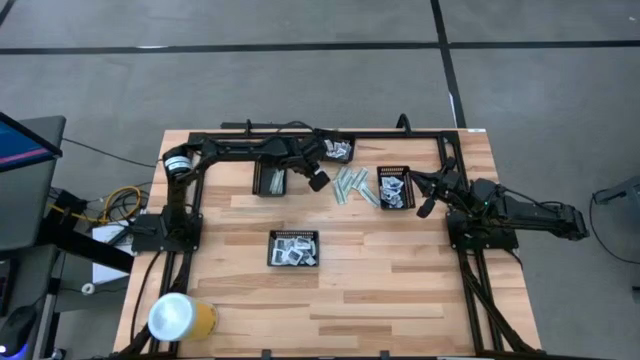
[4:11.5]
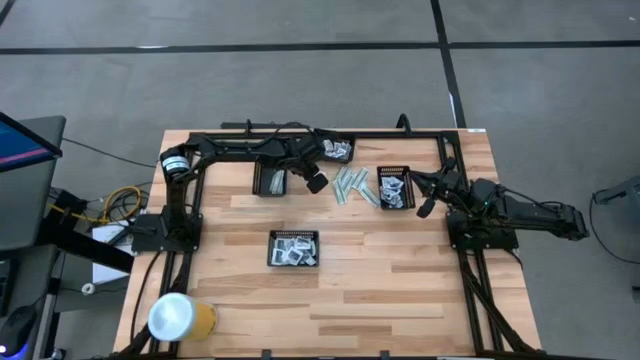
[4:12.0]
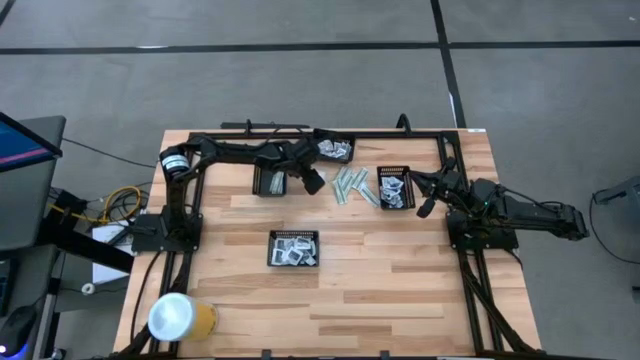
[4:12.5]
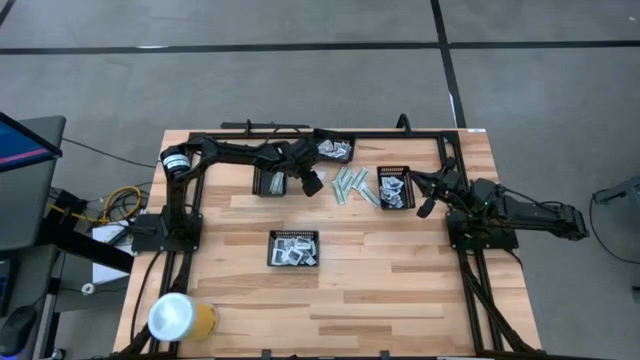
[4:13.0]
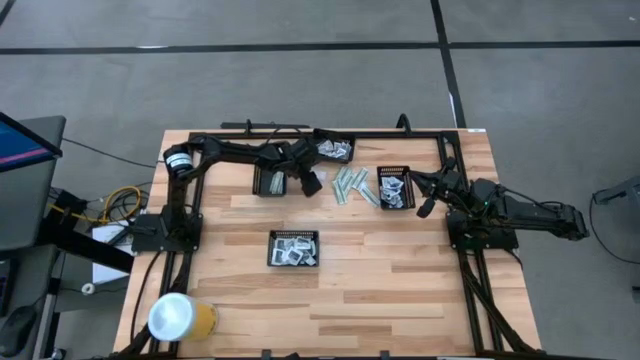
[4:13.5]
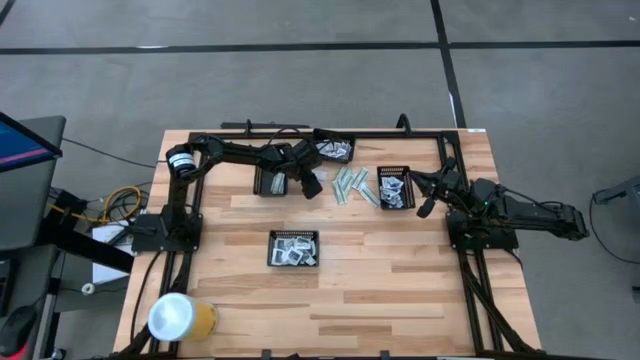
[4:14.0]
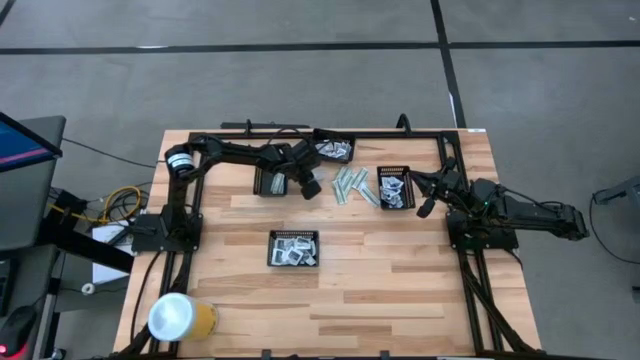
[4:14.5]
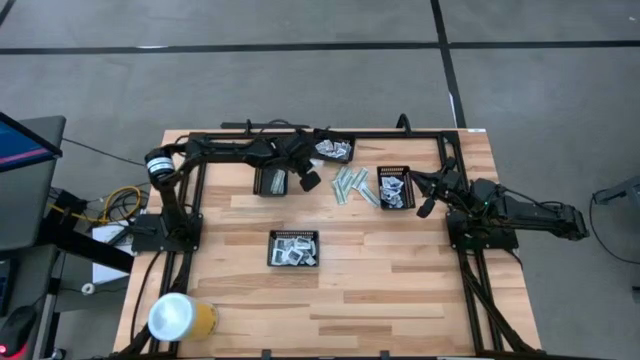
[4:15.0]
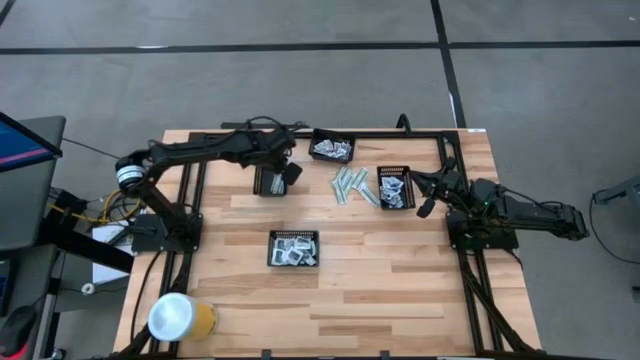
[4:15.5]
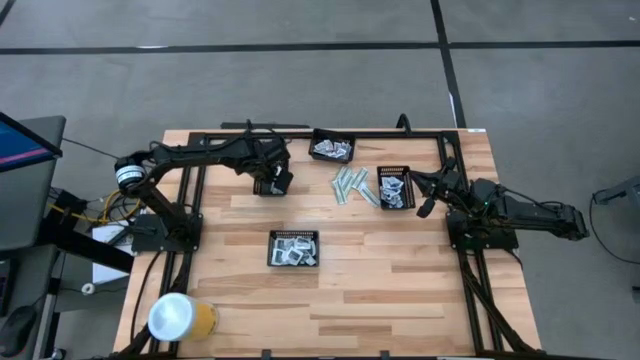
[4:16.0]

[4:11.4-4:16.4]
Task: Pick & Place First Aid Supplies
Put the green bandage into the left black bin

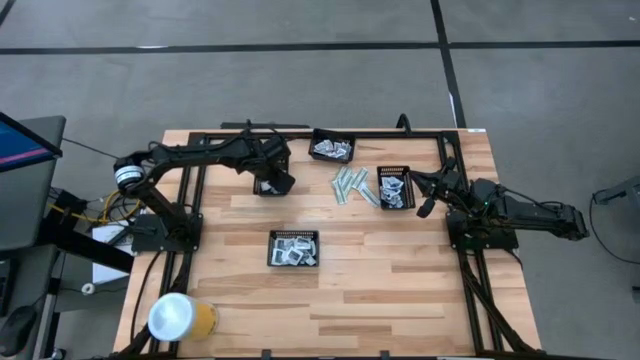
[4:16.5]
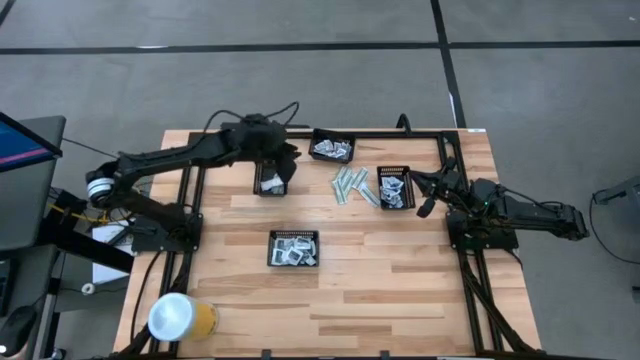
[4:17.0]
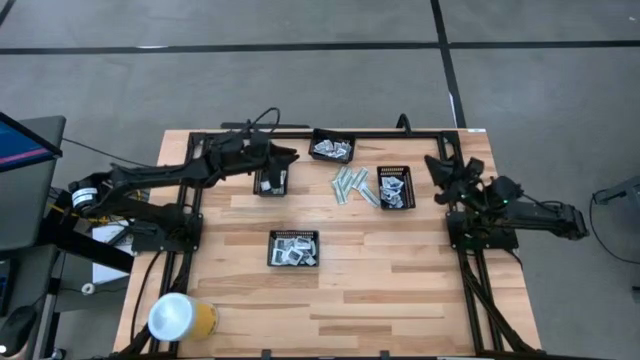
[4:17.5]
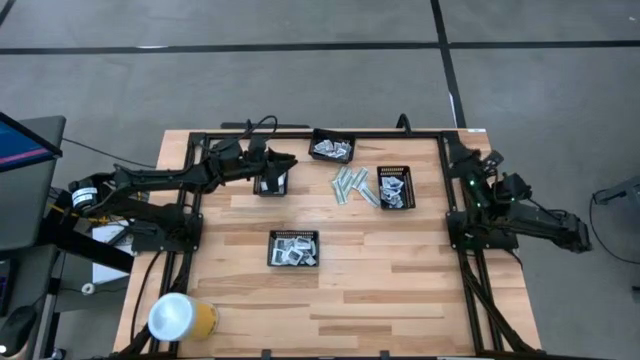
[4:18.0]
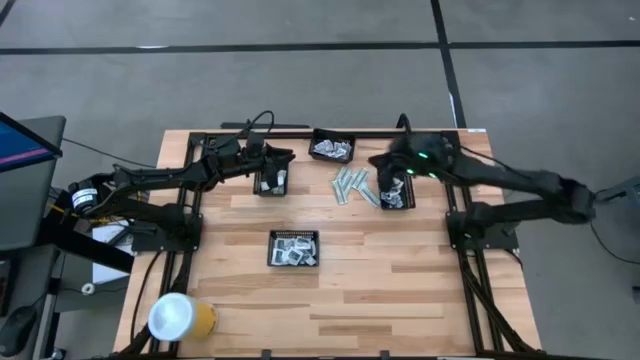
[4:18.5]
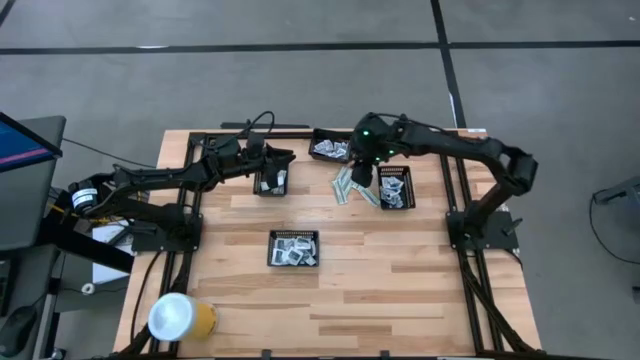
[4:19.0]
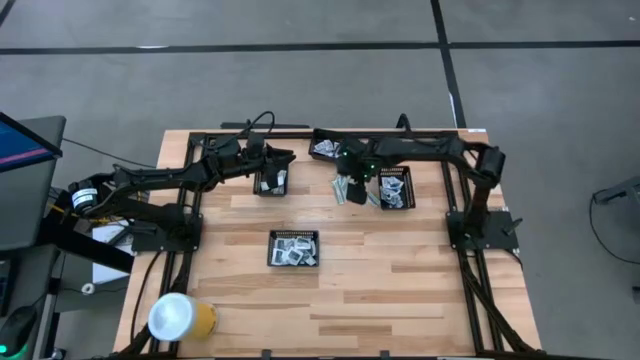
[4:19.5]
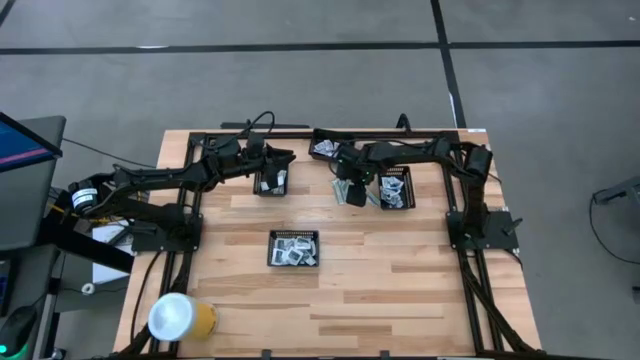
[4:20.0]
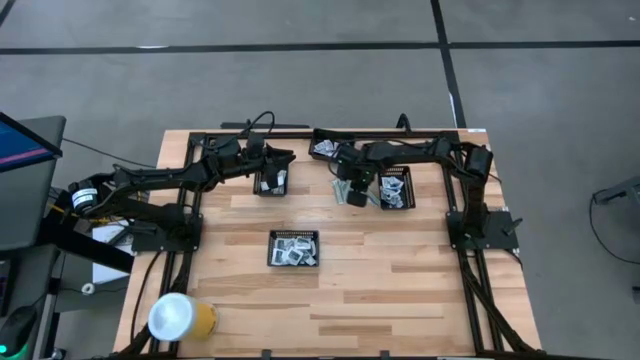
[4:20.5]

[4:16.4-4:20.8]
Put the green bandage into the left black bin

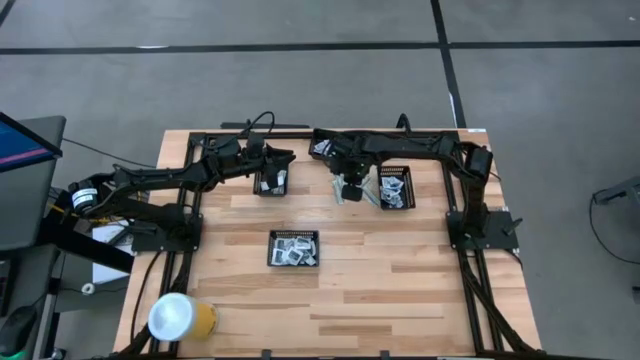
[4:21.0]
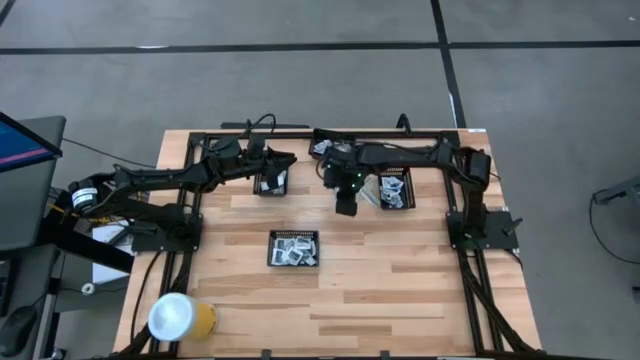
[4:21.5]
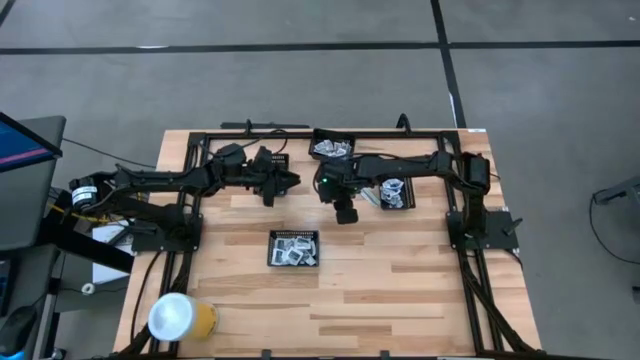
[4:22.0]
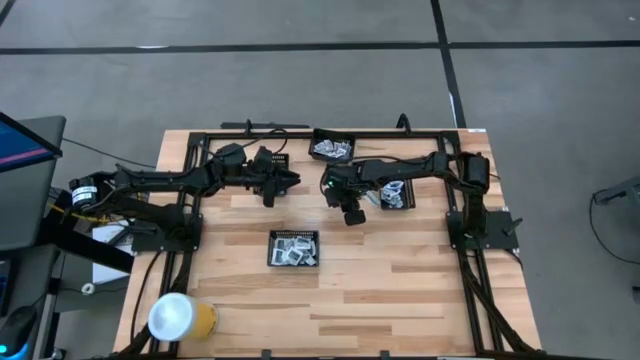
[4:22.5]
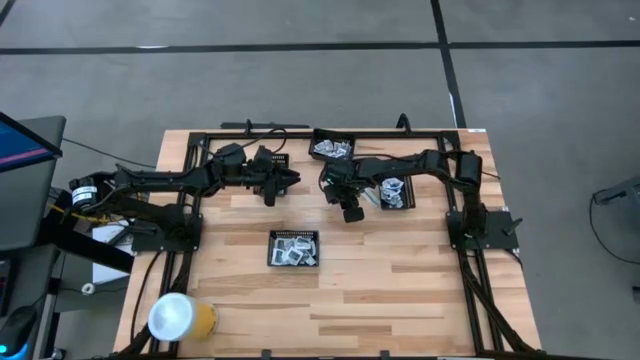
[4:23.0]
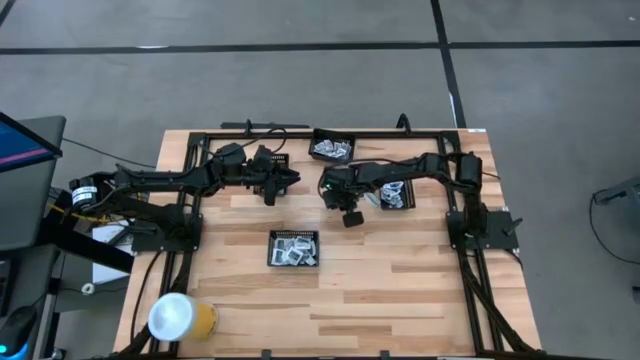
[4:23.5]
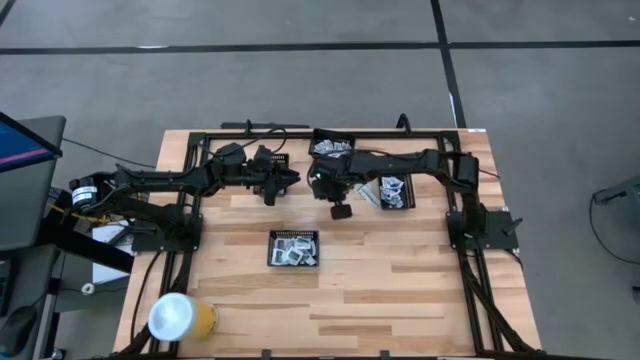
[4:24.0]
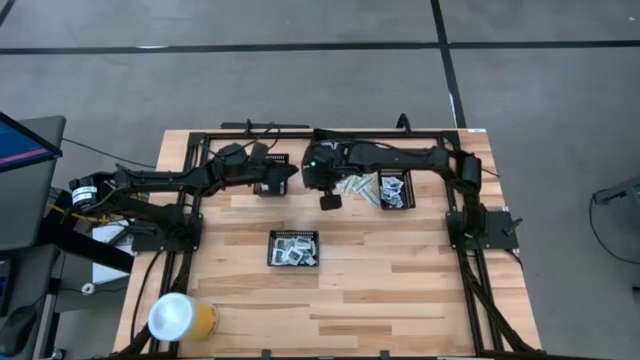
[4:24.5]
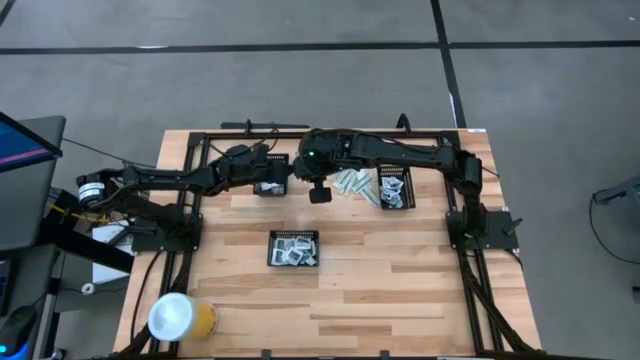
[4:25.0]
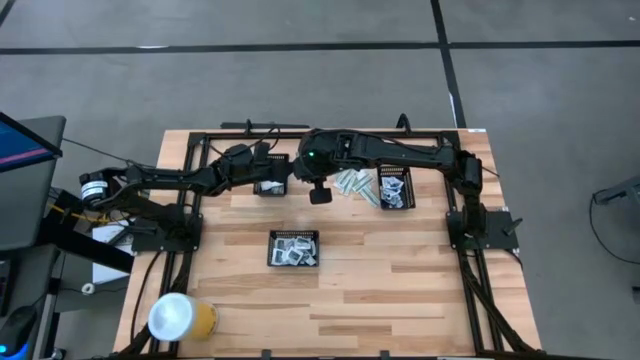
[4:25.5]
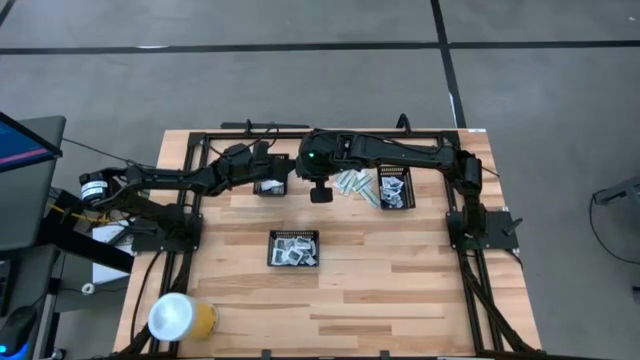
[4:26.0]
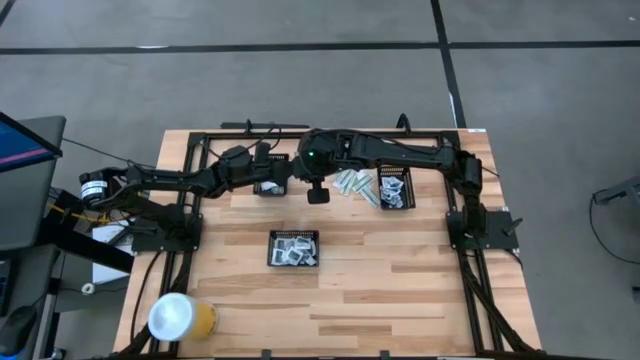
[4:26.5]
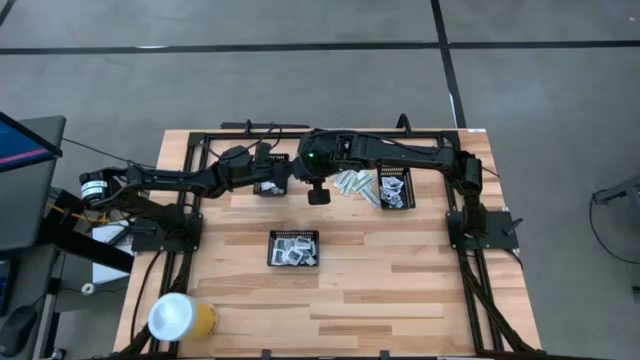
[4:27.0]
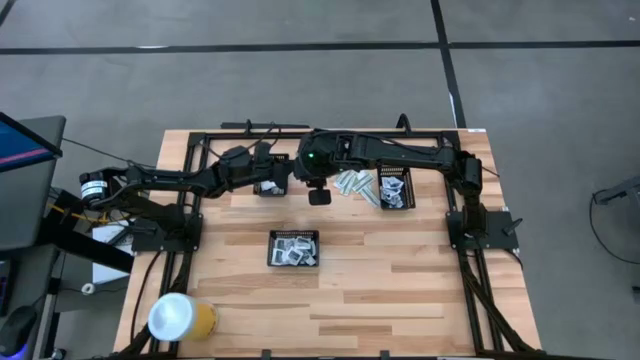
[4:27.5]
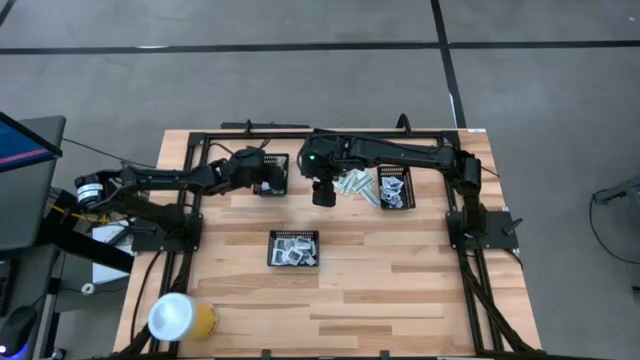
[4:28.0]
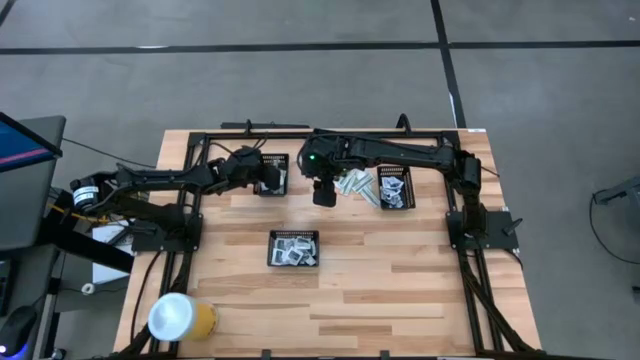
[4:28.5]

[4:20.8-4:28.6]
Put the green bandage into the left black bin

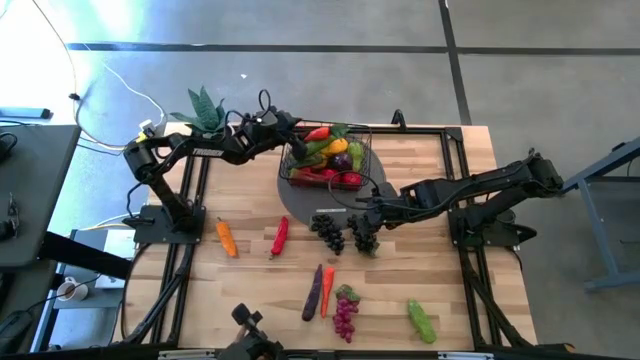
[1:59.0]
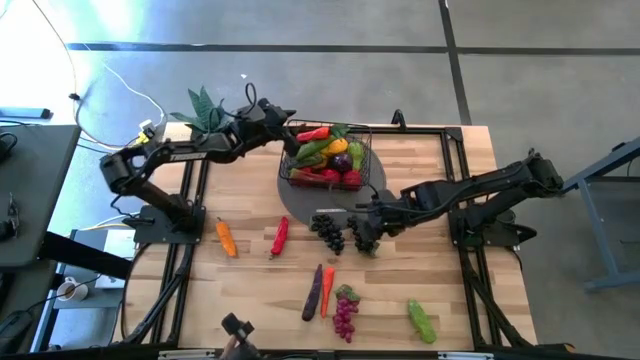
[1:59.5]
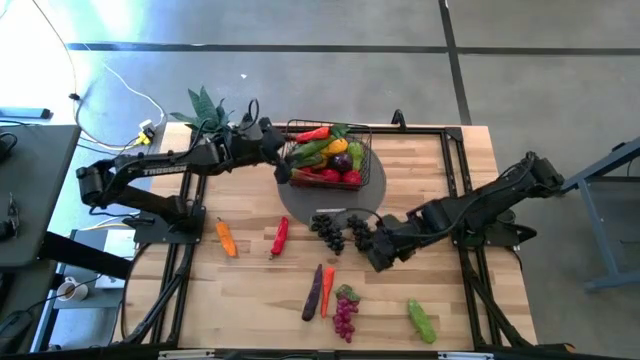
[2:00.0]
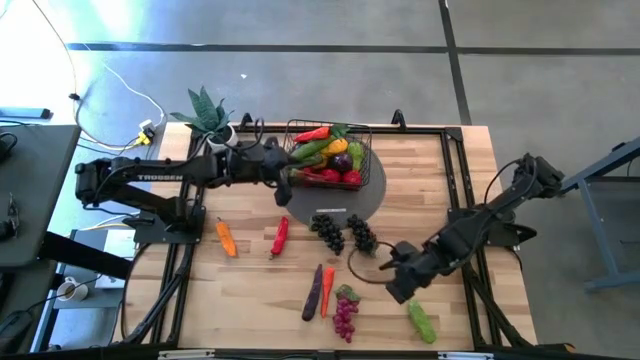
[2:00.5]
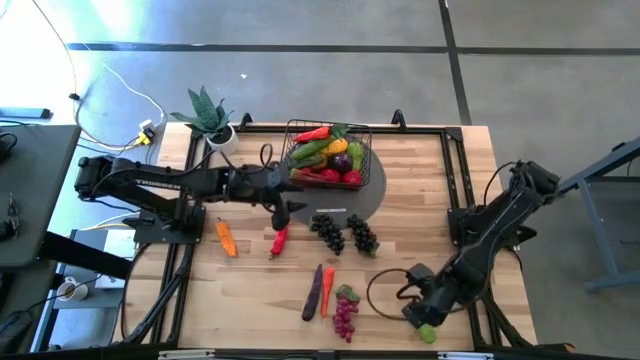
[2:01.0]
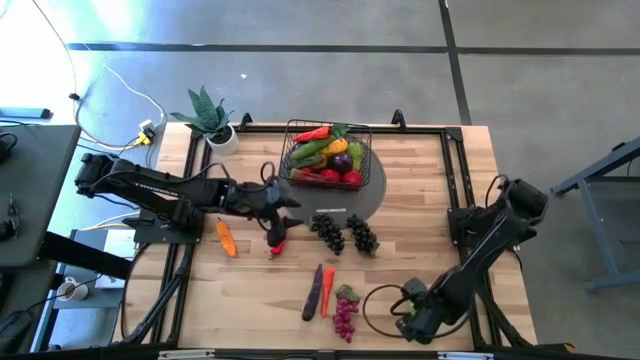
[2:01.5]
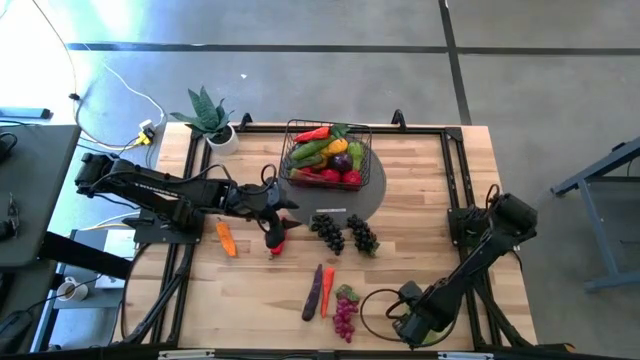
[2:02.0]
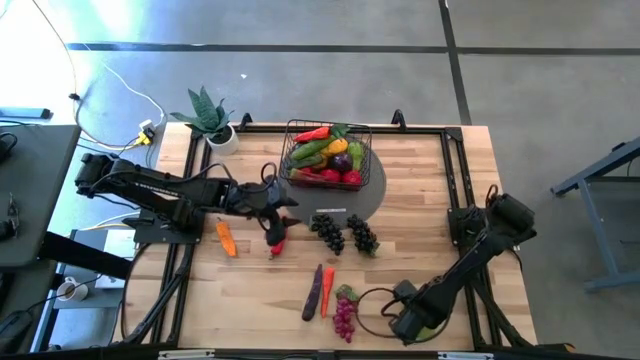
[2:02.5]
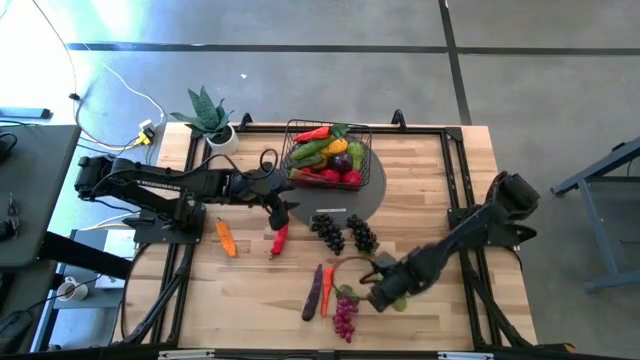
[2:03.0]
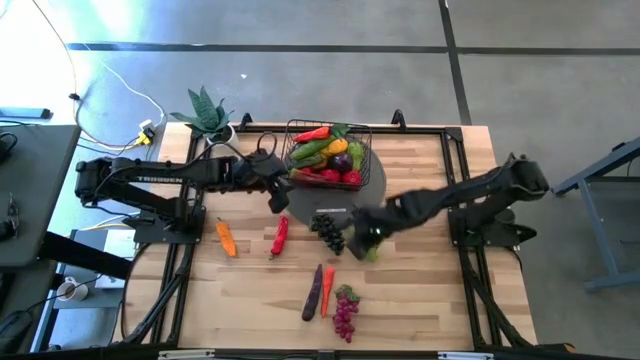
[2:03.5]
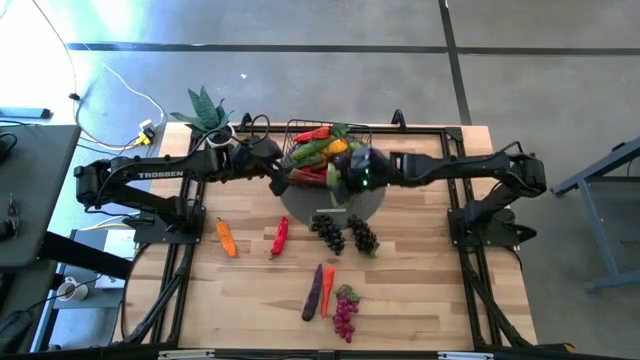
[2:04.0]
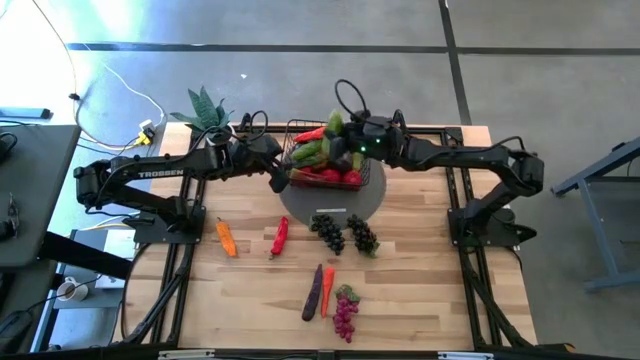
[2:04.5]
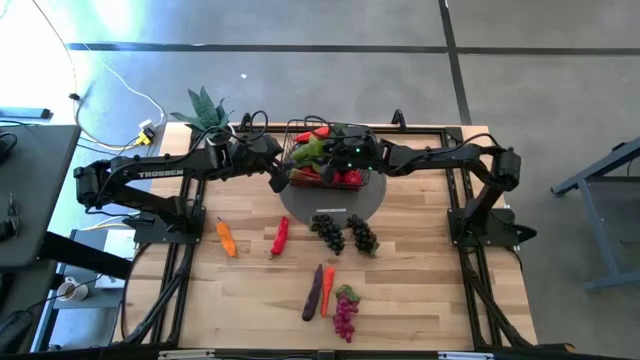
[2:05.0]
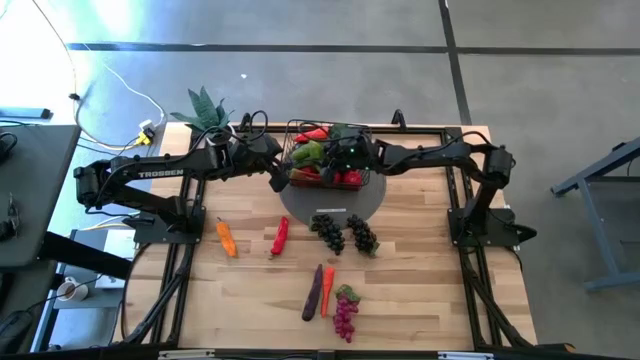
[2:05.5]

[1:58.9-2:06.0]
Task: Build produce basket
Put the green cucumber into the wire basket
